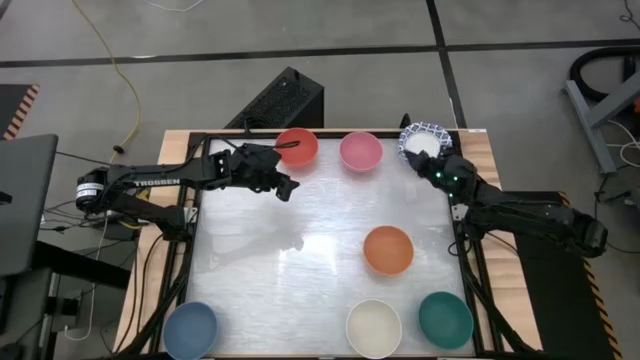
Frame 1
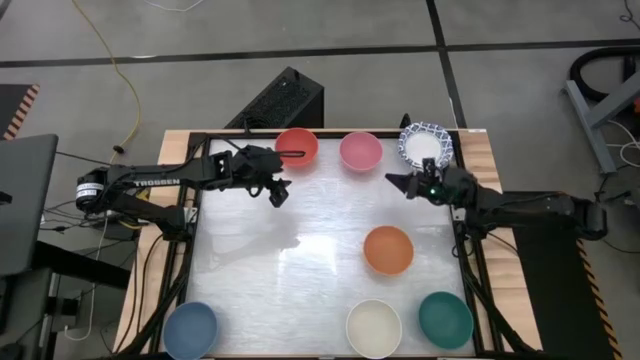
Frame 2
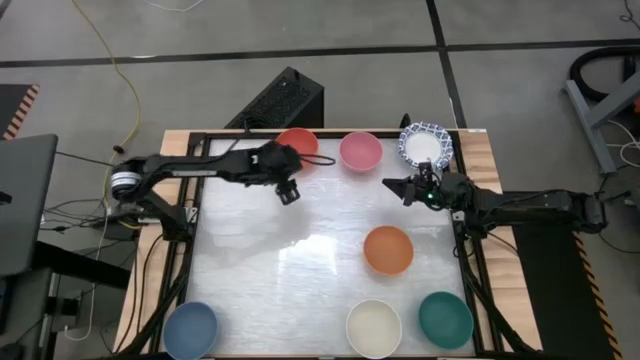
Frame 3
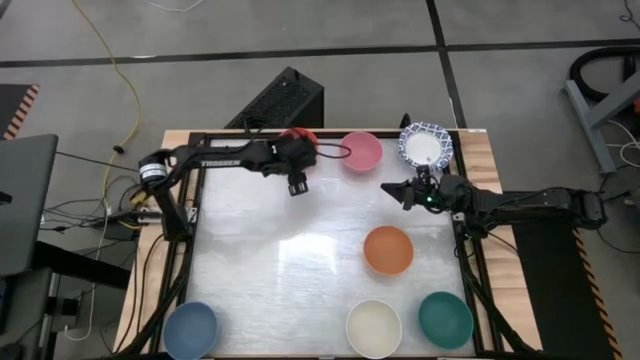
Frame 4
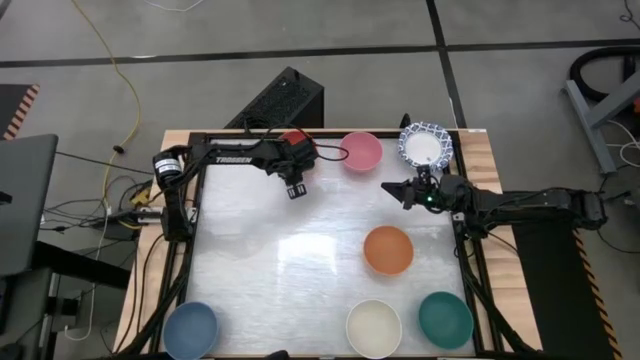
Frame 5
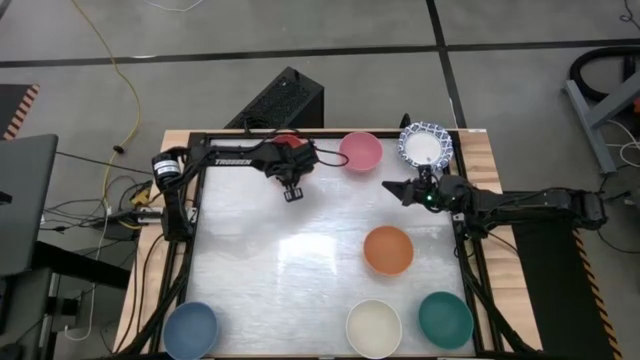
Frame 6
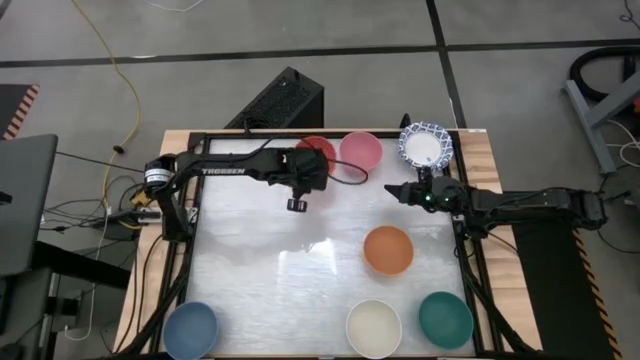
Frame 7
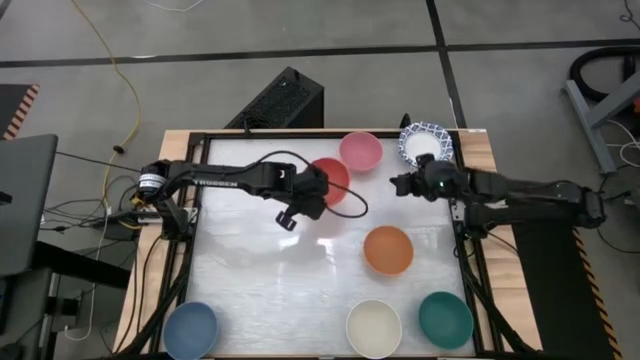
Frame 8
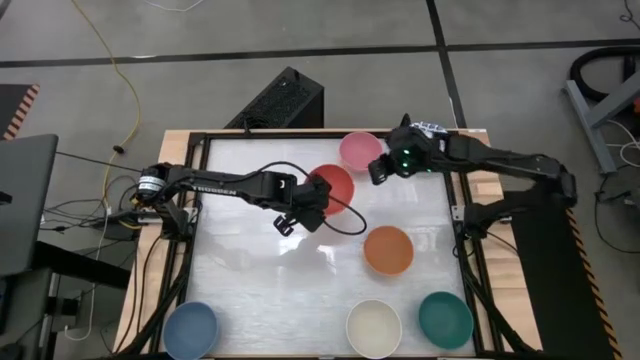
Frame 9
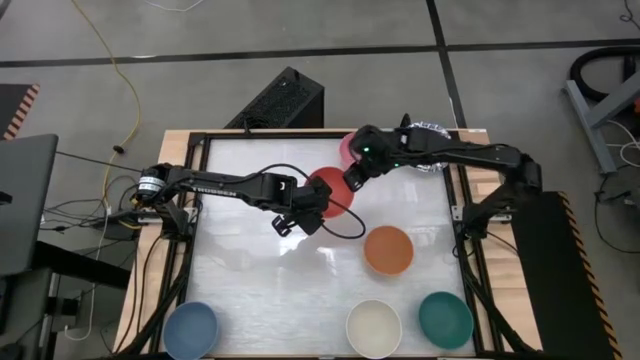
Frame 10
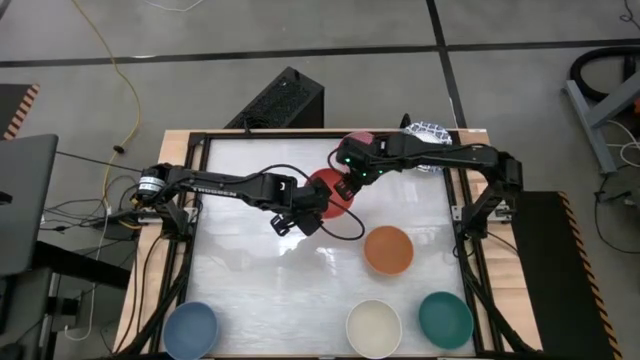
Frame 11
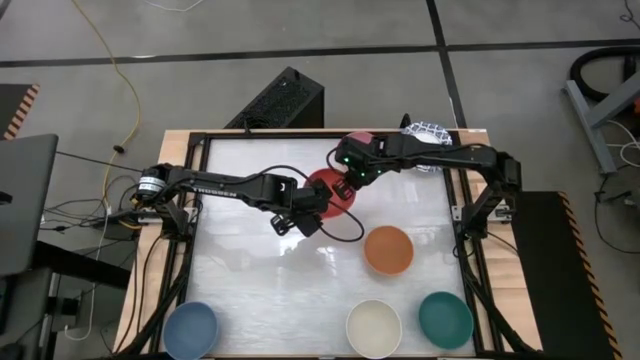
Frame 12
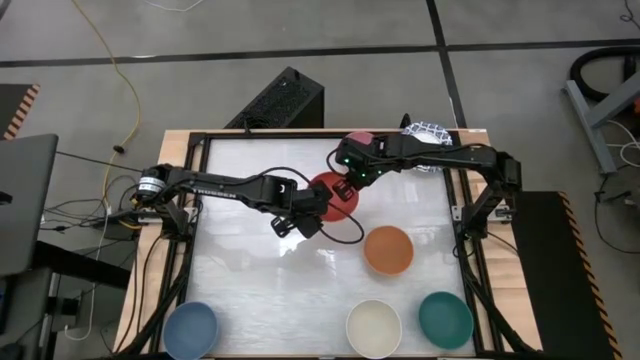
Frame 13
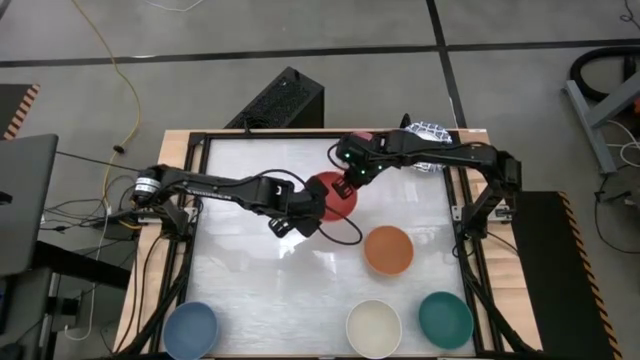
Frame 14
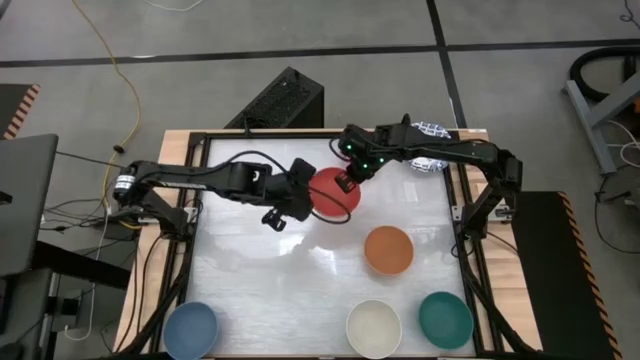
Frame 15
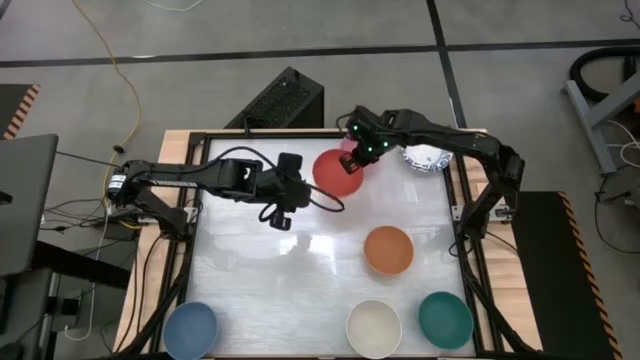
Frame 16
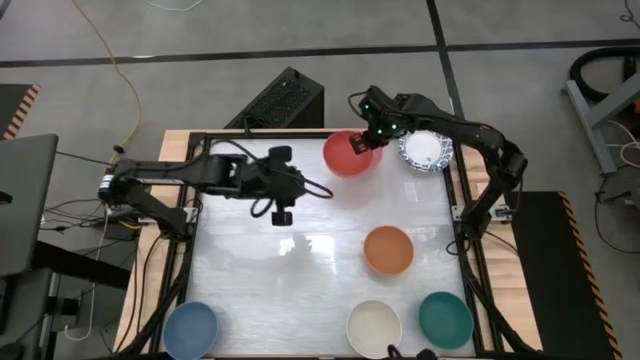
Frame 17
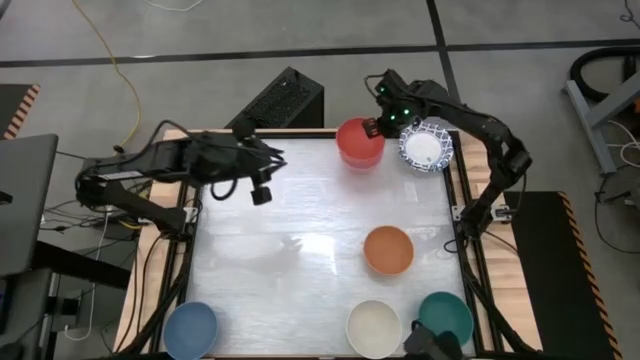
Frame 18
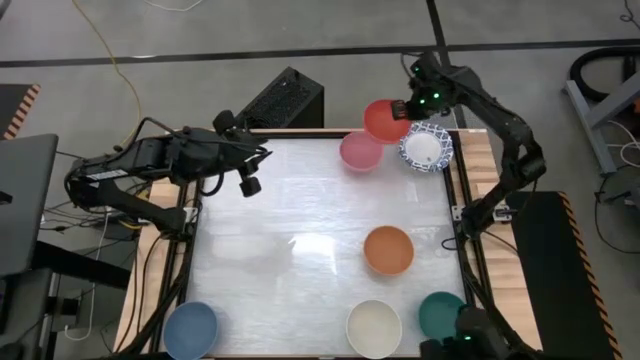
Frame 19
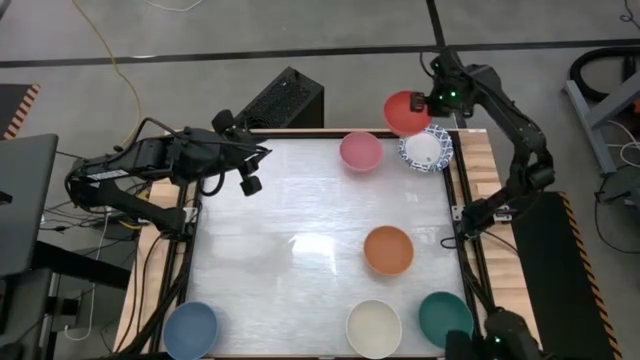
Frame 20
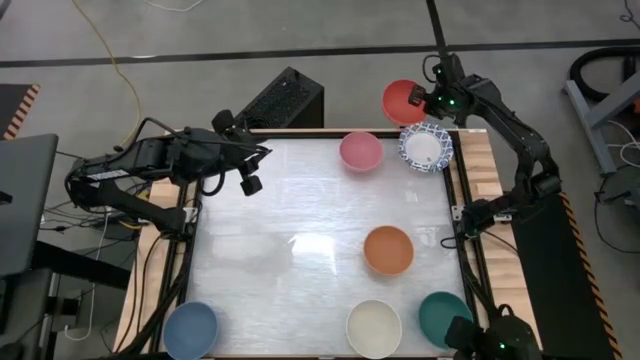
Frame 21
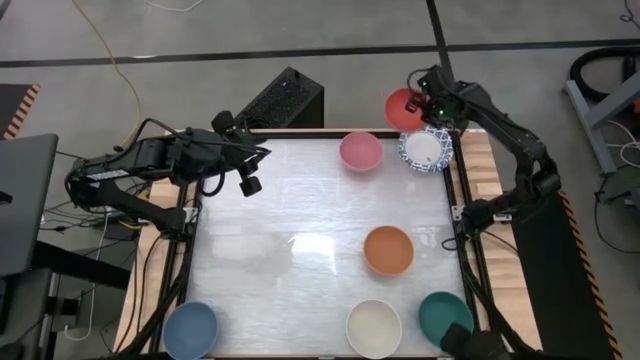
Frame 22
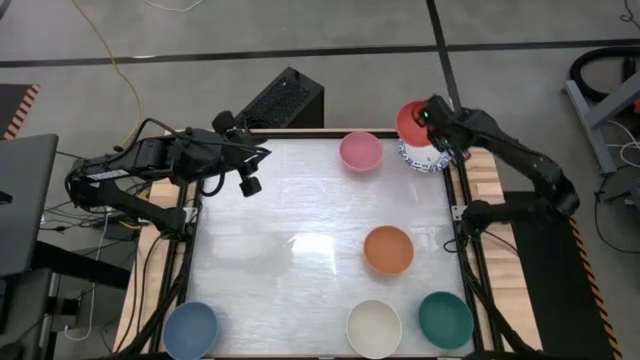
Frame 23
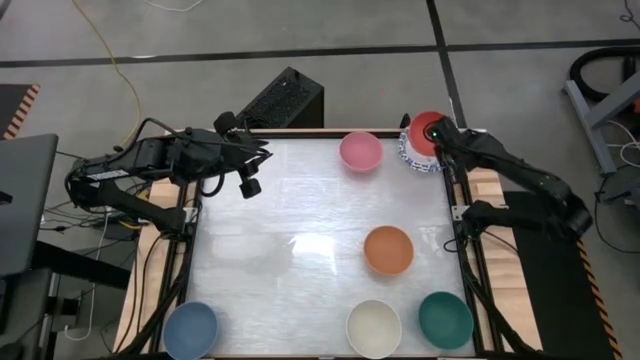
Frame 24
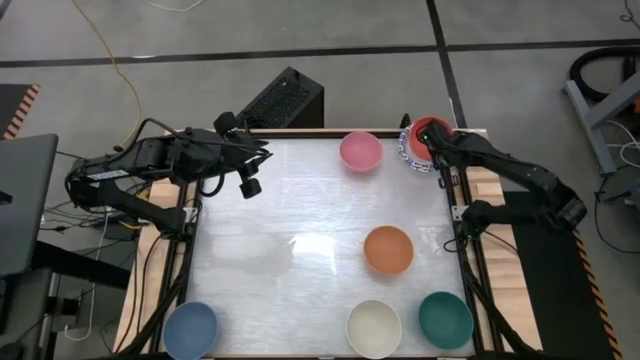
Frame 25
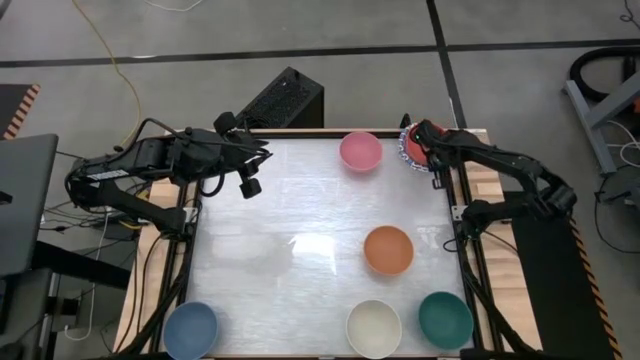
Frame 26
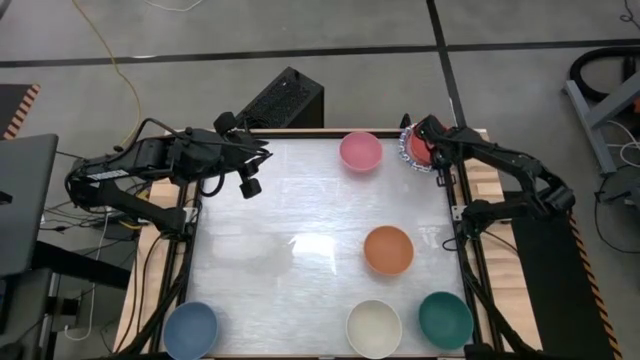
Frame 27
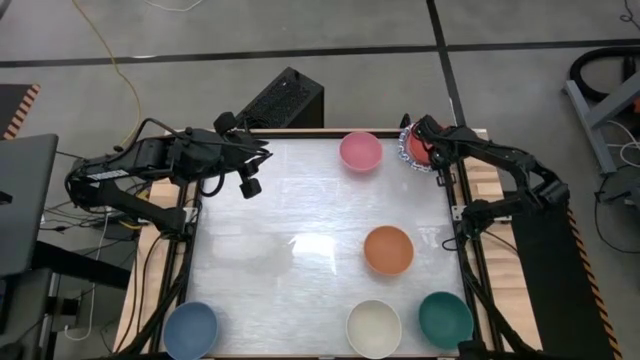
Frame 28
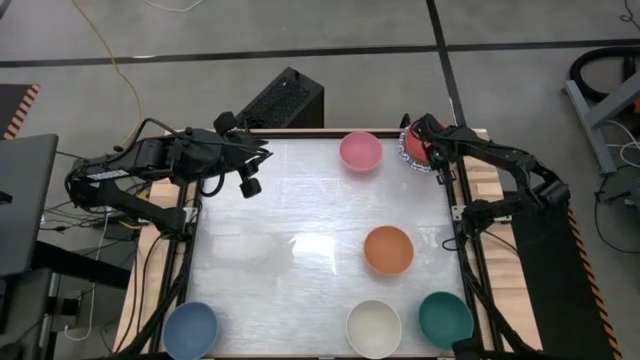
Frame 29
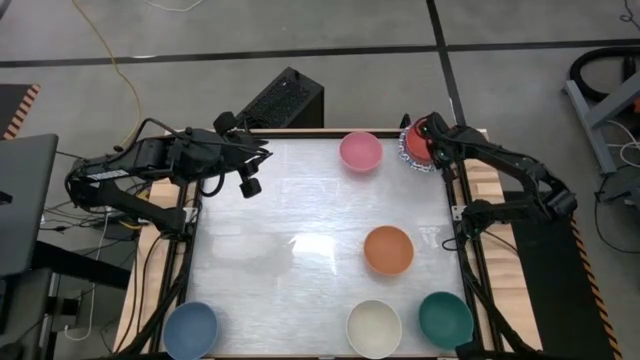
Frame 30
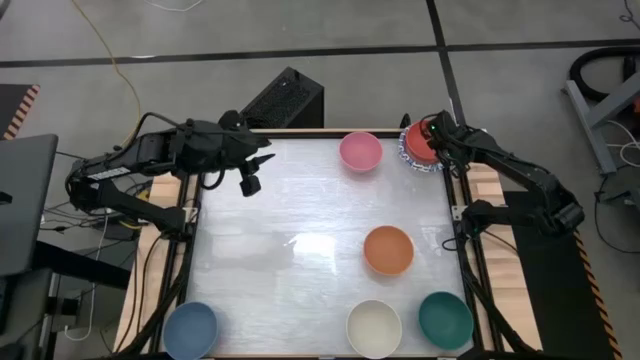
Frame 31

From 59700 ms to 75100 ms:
Stack the orange bowl on top of the blue patterned bowl

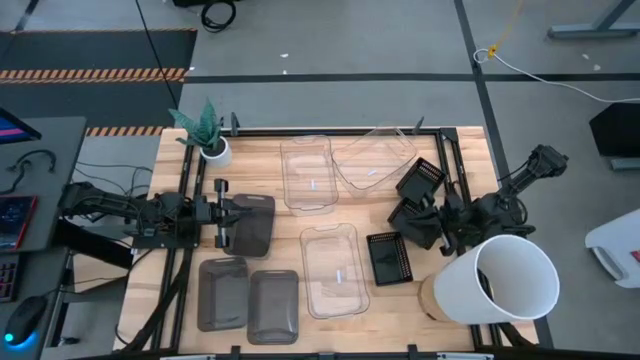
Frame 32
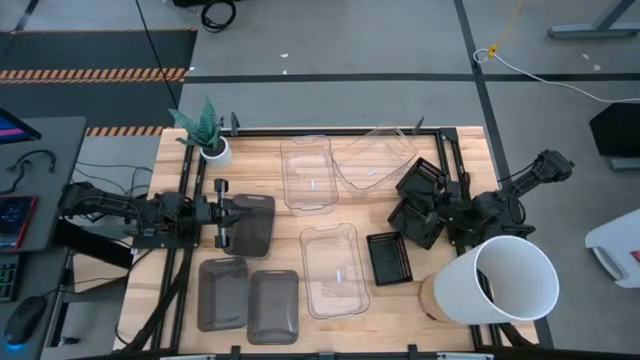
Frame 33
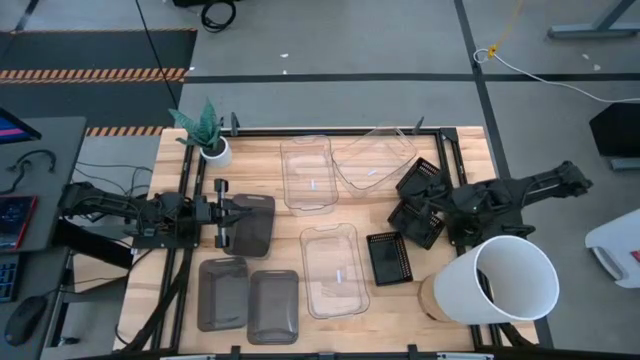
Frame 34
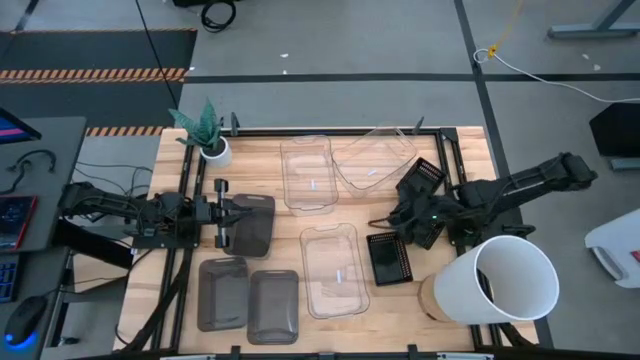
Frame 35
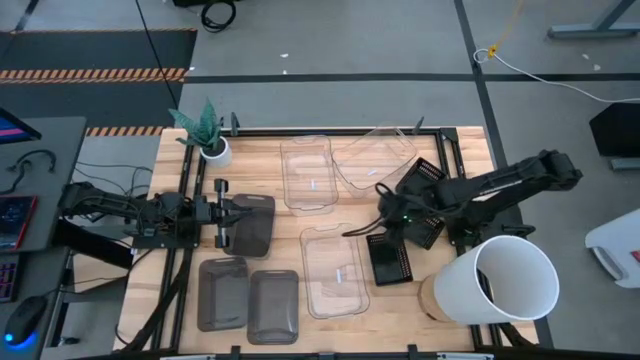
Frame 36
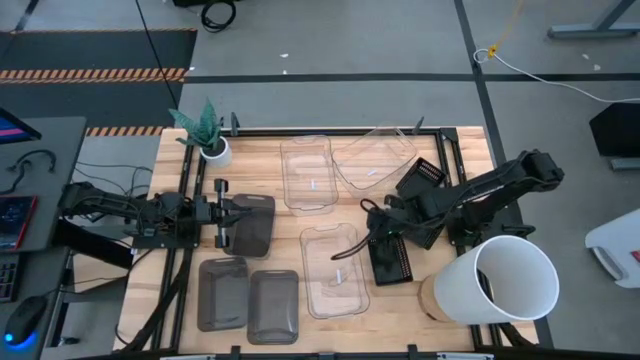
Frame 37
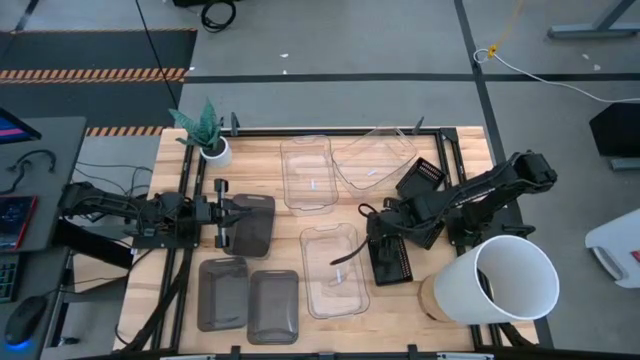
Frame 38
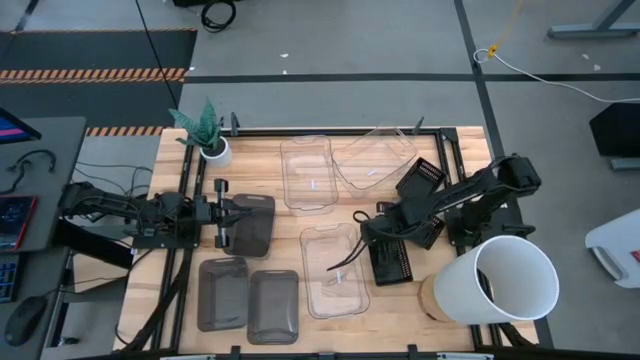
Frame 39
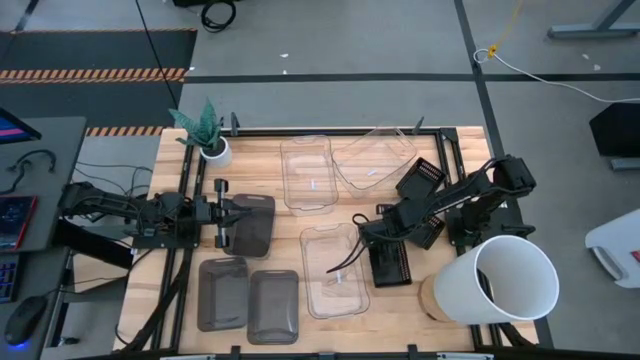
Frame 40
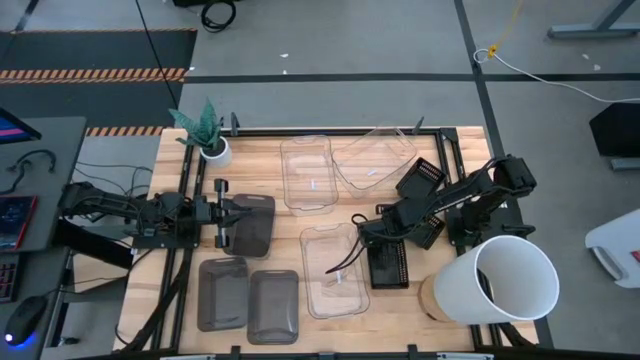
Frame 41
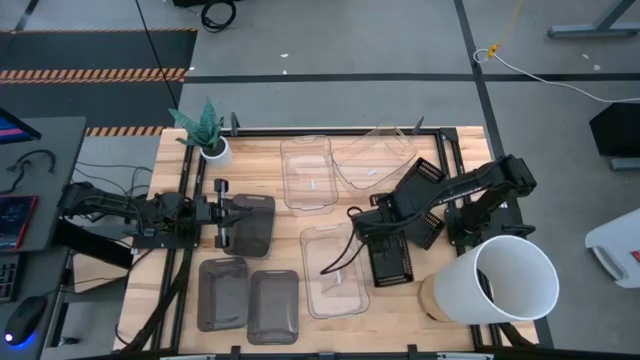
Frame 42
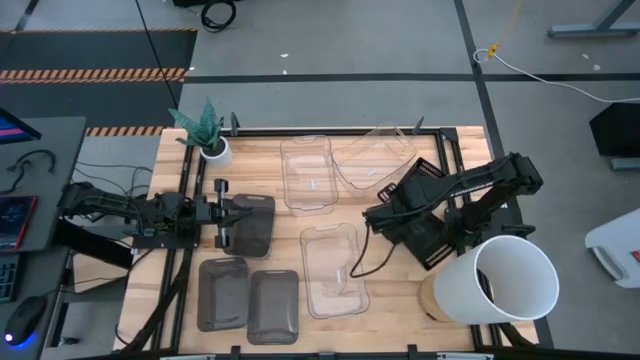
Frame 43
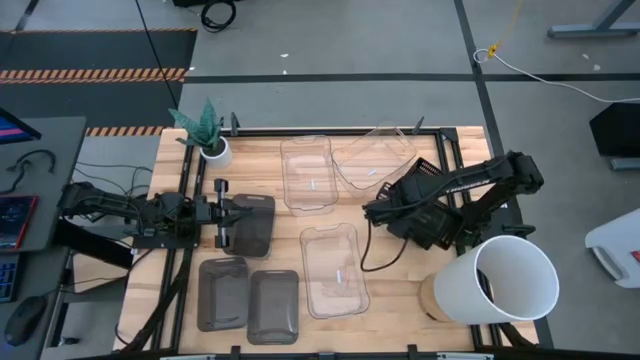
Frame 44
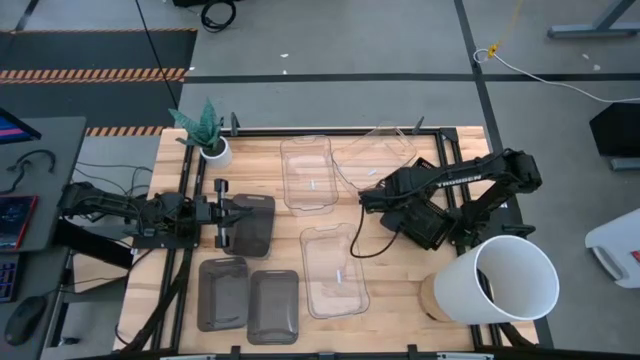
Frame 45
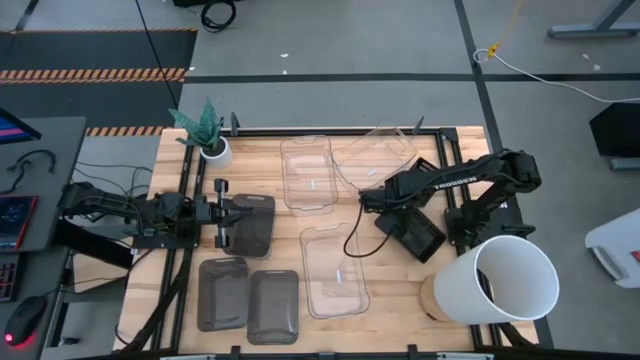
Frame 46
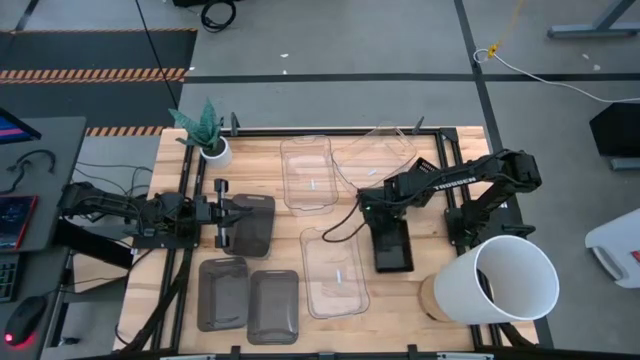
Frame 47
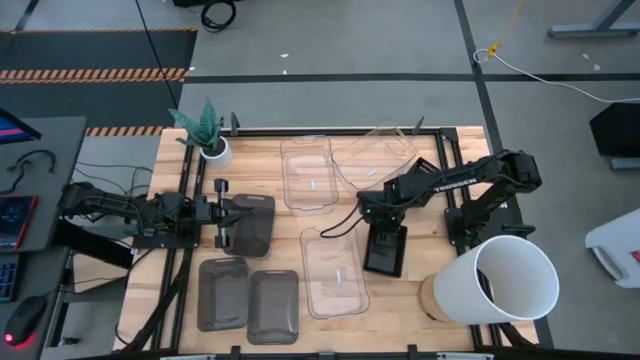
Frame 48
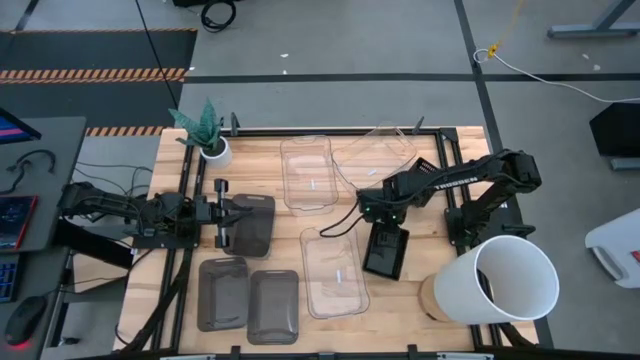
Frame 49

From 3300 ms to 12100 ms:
Stack the bottom black bin on the middle black bin
